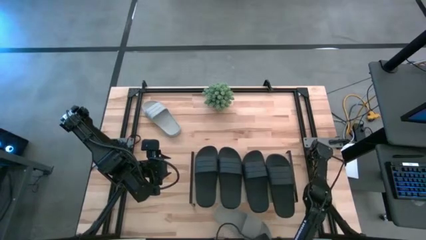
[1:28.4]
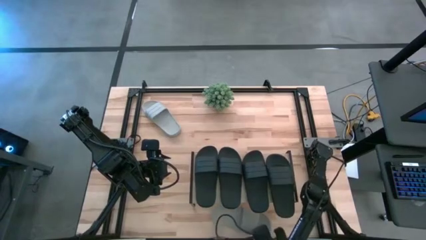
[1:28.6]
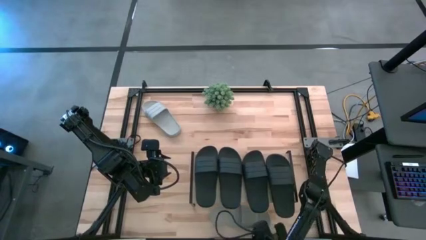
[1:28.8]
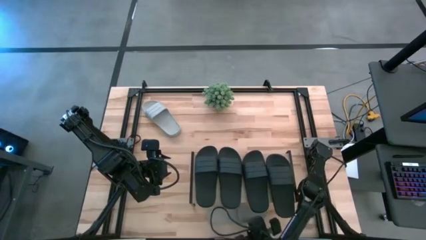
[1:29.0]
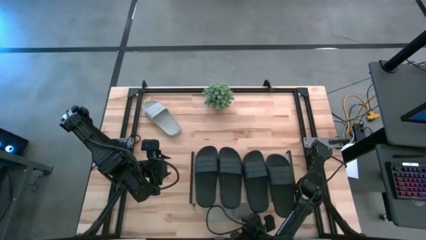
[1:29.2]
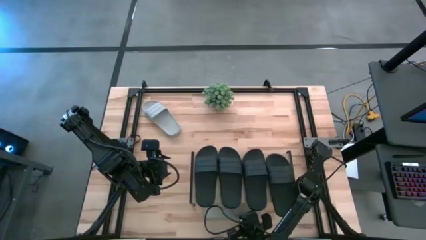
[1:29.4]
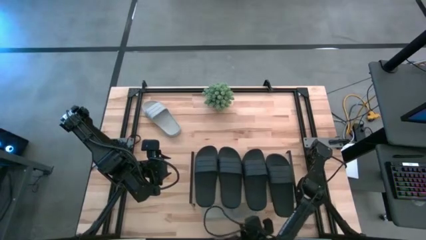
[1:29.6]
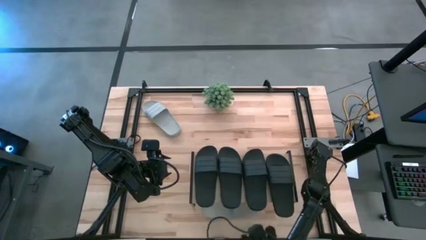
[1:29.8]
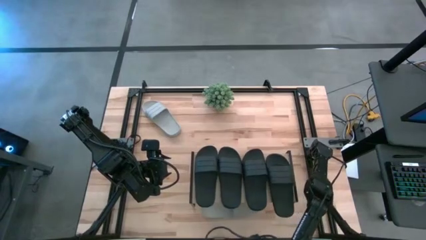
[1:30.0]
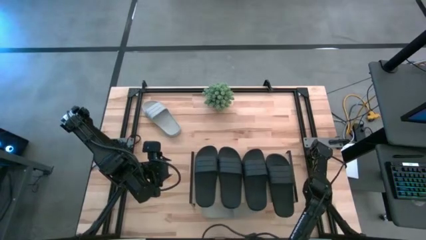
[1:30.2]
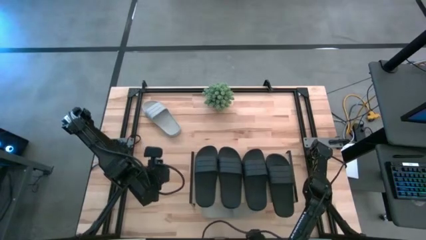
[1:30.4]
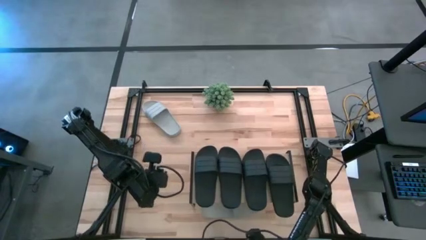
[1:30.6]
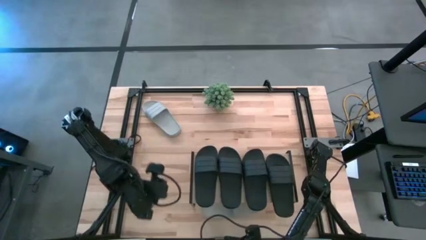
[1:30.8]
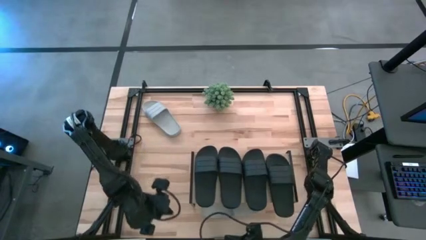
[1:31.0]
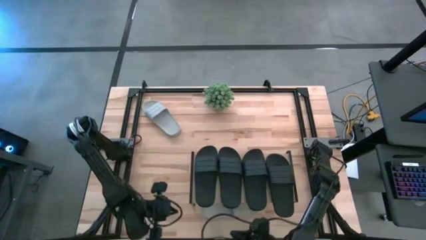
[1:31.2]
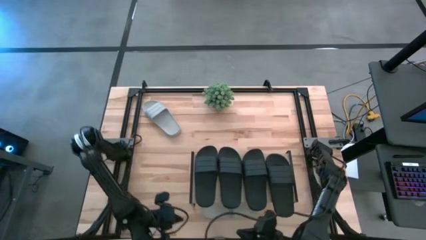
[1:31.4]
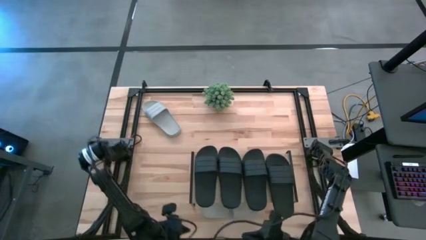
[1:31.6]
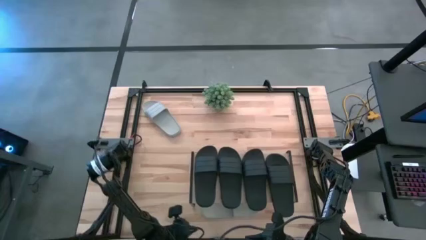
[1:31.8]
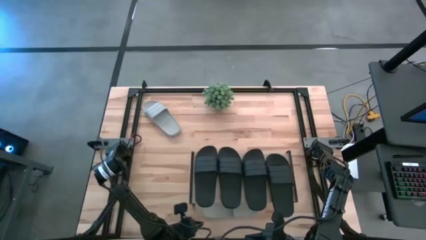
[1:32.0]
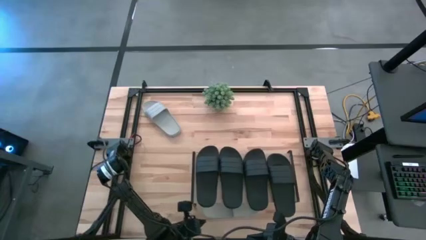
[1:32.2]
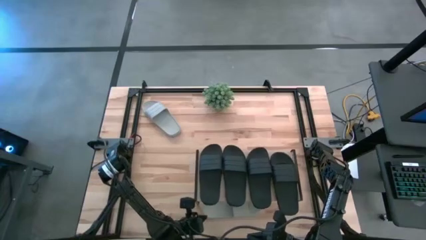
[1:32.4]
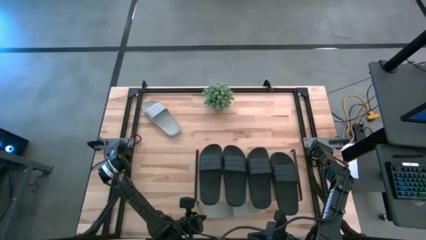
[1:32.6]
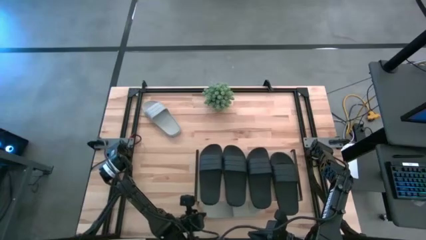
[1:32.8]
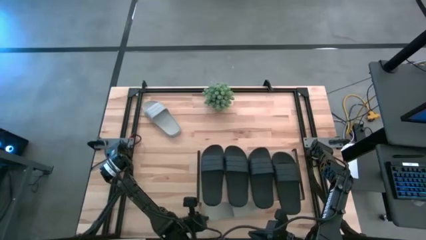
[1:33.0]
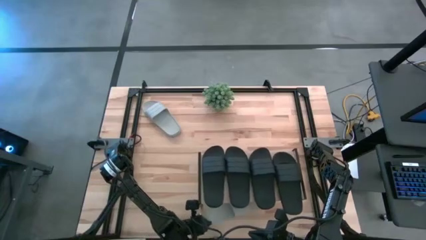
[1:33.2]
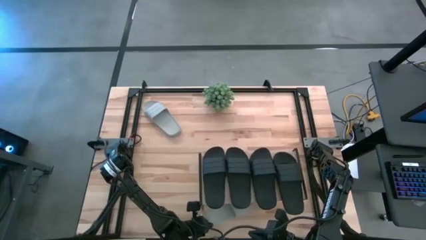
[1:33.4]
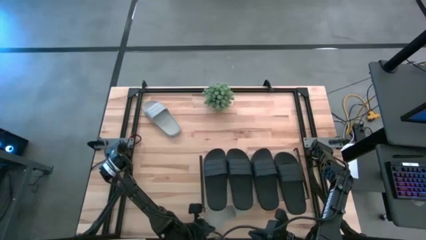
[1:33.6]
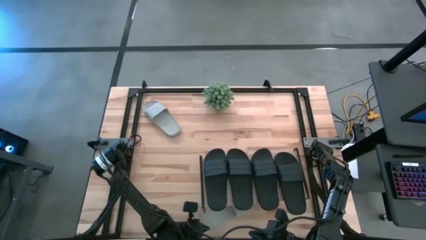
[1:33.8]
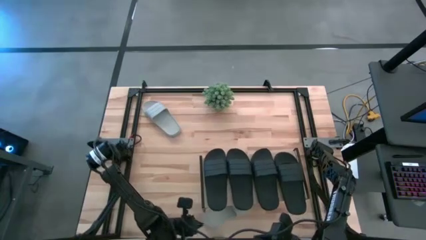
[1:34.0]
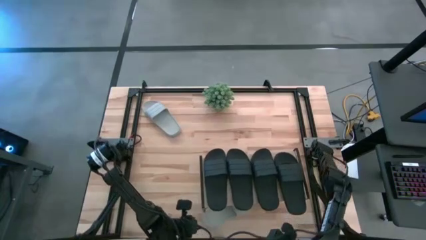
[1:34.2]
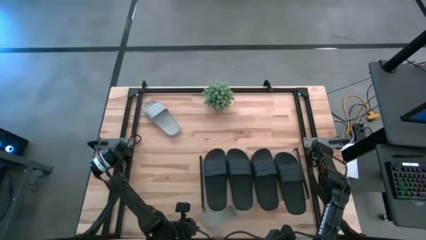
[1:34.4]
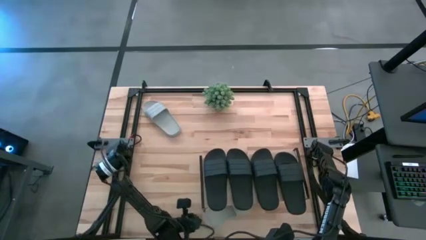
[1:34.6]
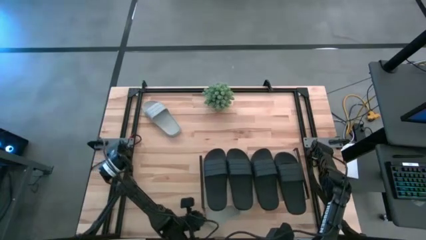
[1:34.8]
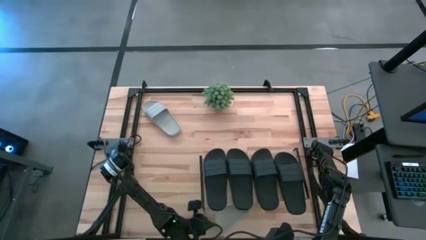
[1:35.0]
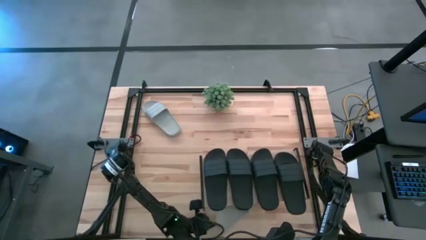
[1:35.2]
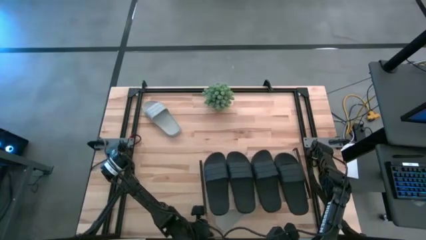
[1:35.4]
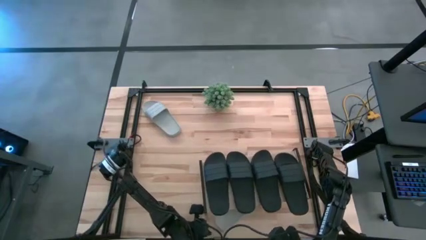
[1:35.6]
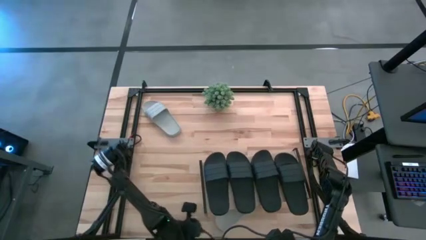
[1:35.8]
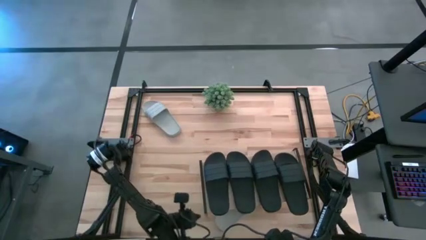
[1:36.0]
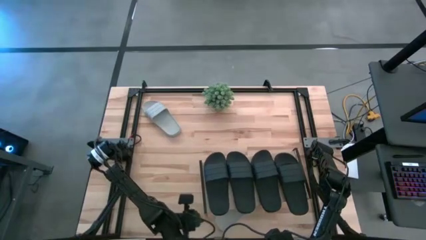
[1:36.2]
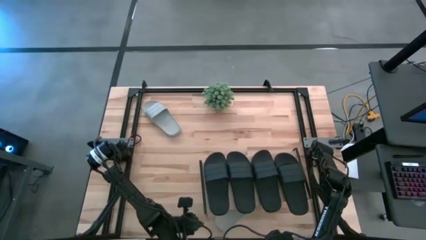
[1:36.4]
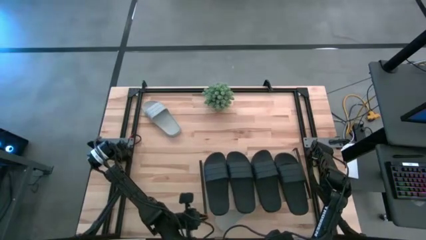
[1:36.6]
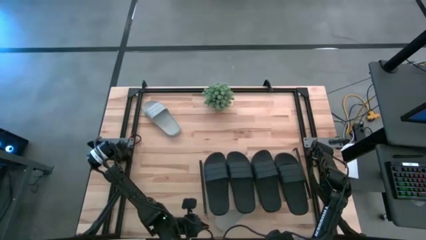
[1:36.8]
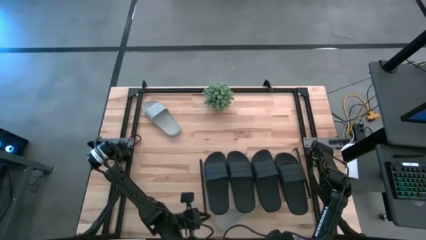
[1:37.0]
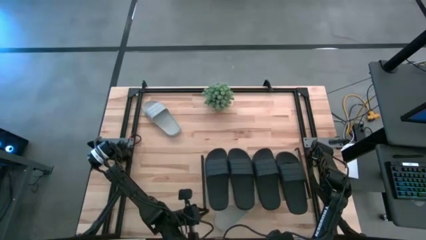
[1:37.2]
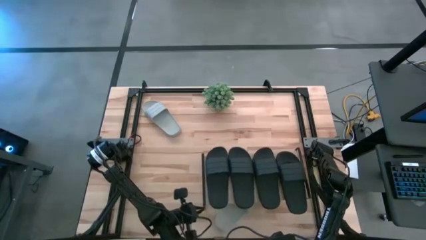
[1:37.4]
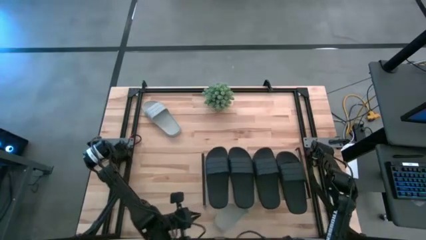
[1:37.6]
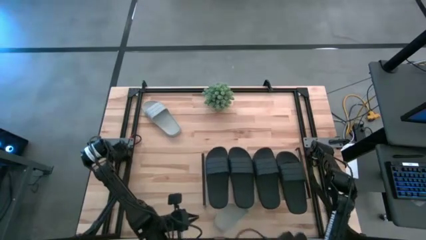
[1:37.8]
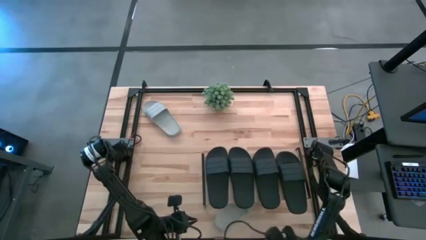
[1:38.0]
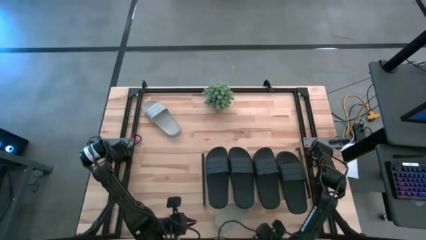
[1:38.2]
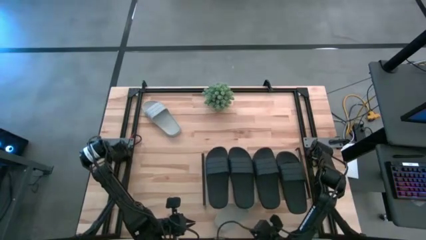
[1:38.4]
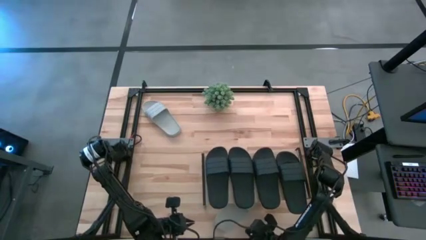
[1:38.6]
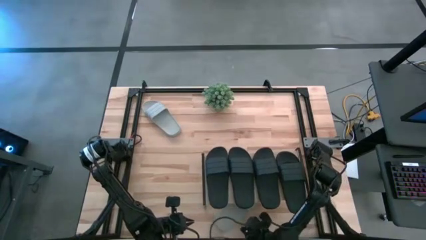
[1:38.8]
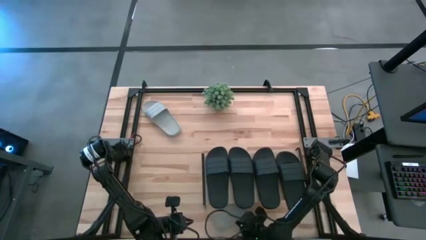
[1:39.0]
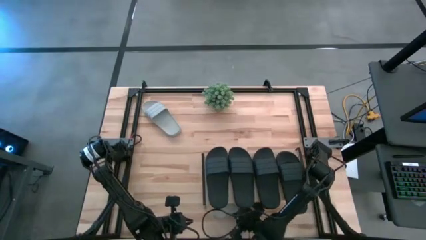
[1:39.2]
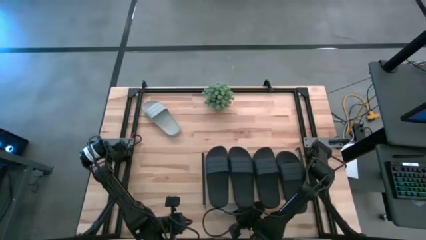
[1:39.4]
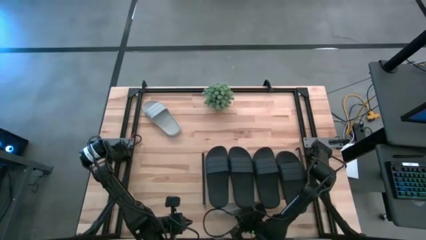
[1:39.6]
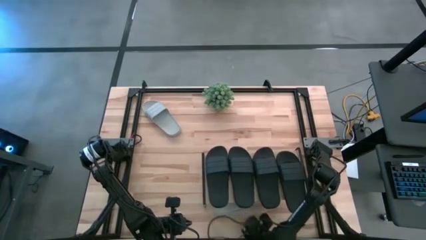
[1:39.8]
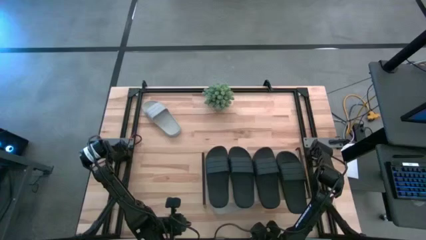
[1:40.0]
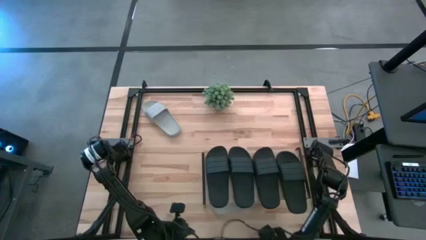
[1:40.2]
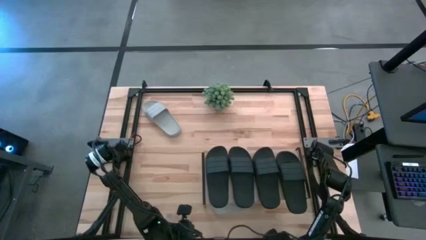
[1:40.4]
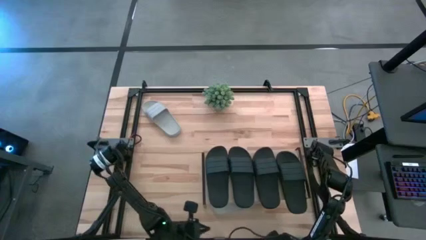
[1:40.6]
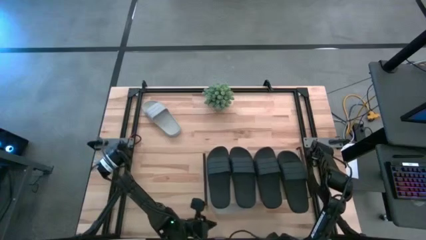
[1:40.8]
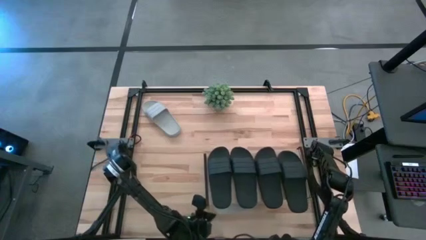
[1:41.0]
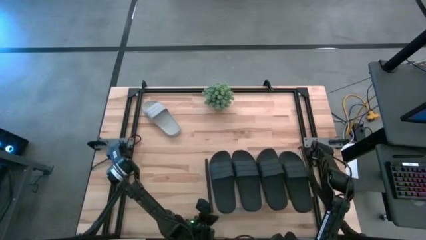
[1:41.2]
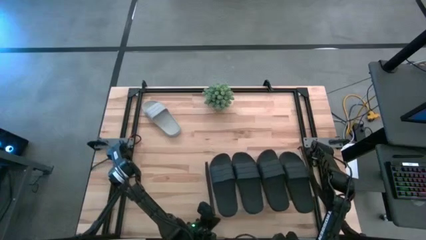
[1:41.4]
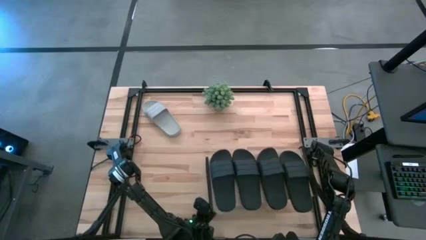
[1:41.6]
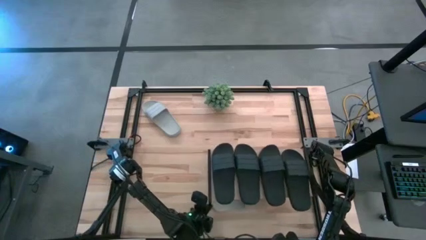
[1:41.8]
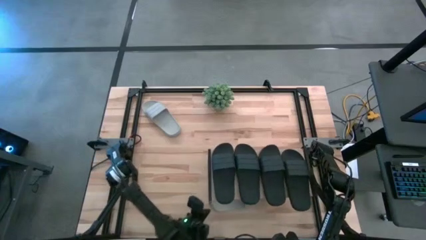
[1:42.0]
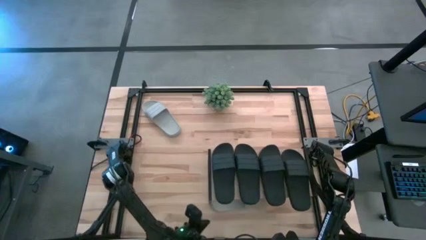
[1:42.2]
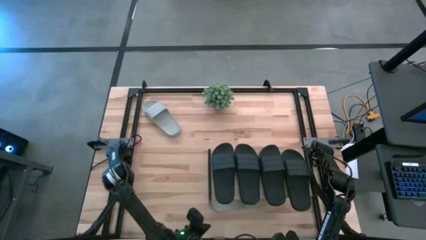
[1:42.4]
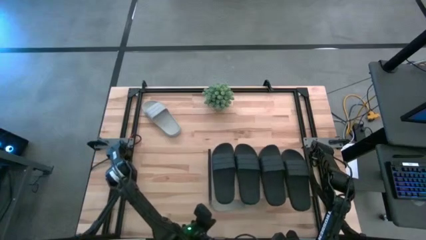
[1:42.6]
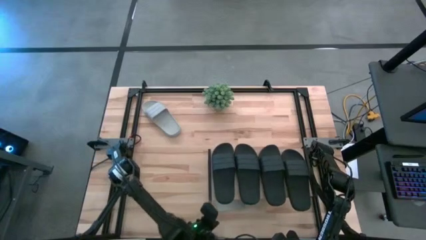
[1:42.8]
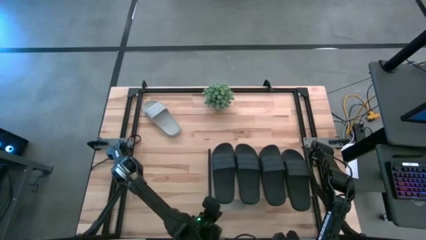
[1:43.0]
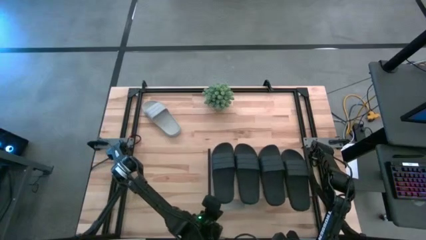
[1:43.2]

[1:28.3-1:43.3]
Task: Pick and place slides into the shelf
Put the white slipper under the shelf
